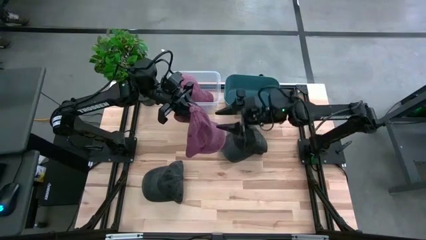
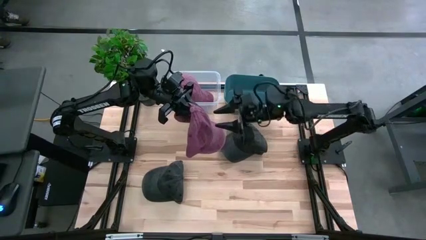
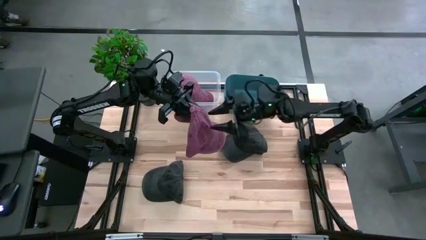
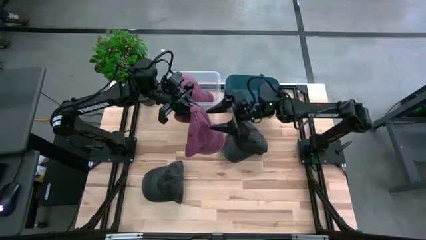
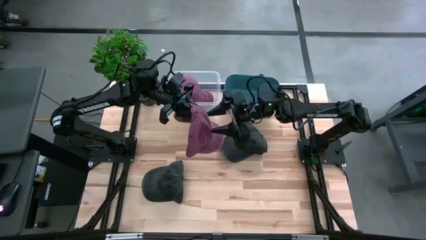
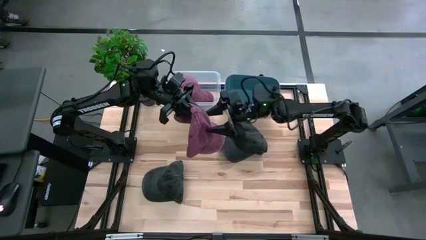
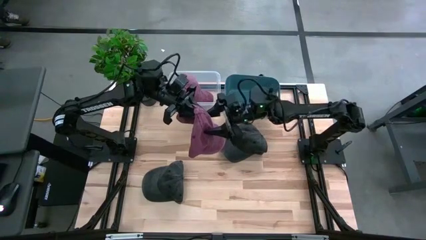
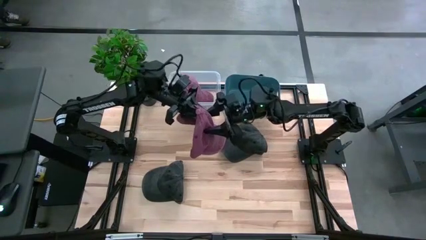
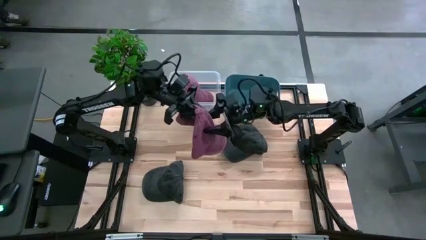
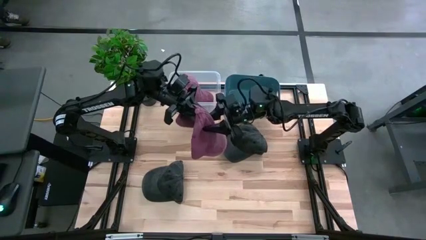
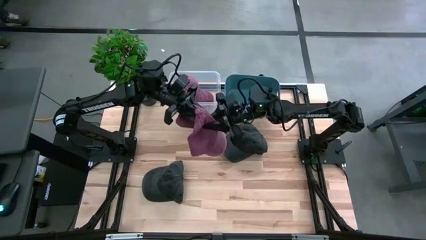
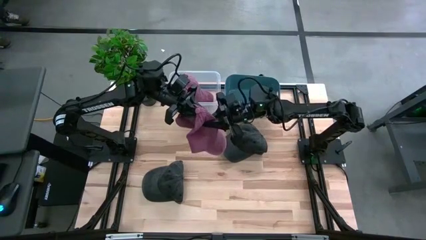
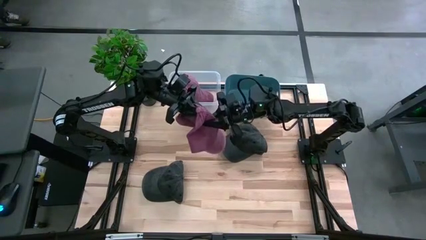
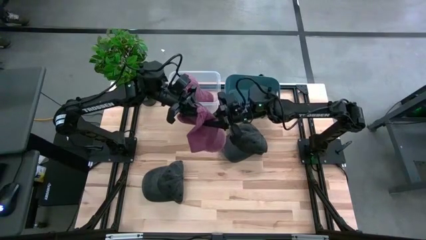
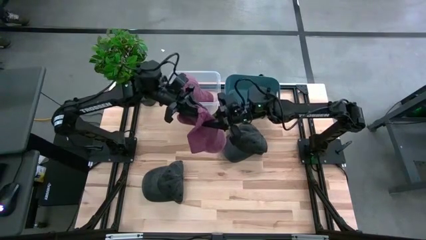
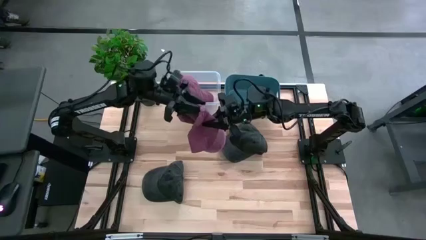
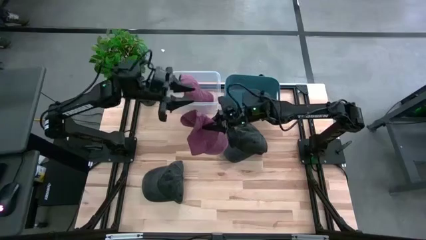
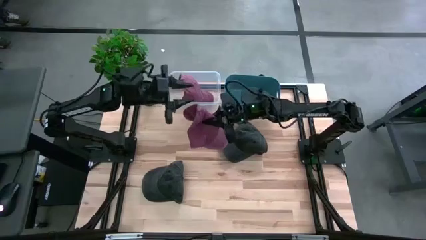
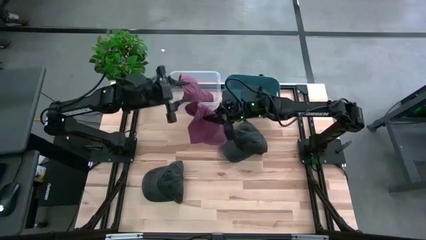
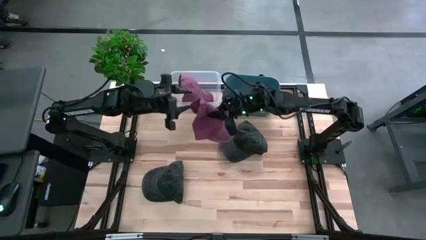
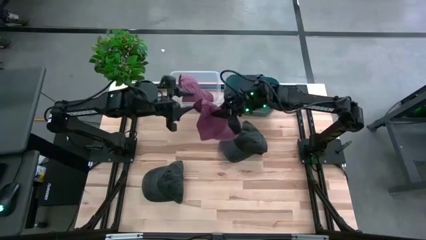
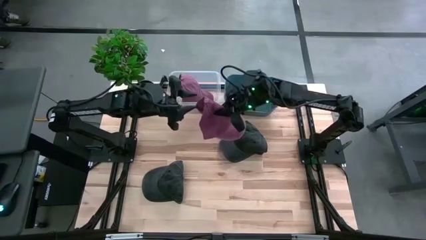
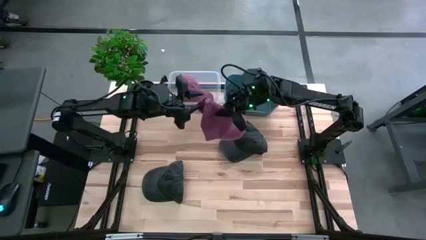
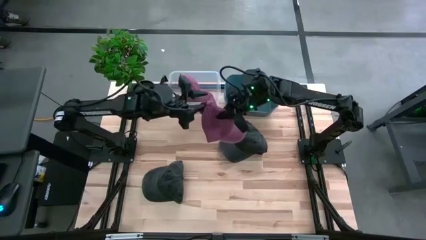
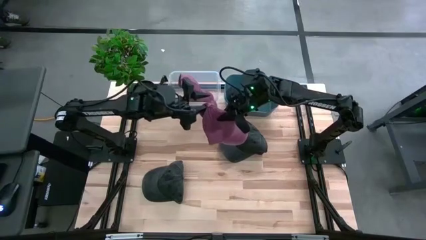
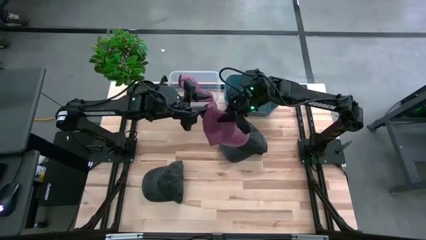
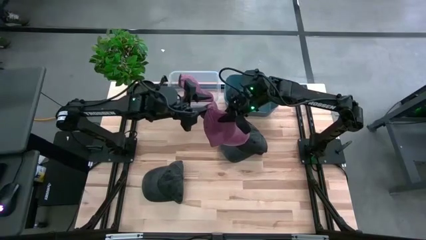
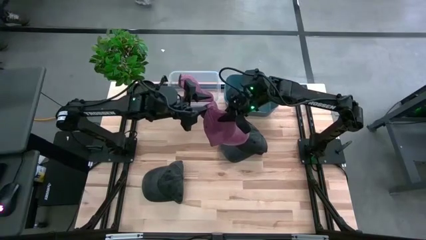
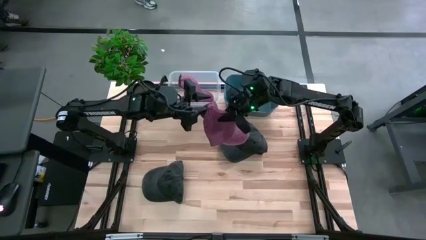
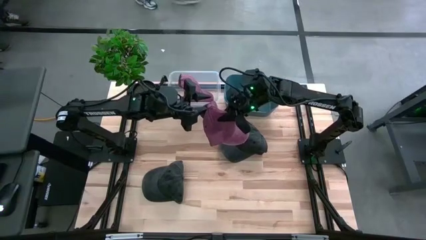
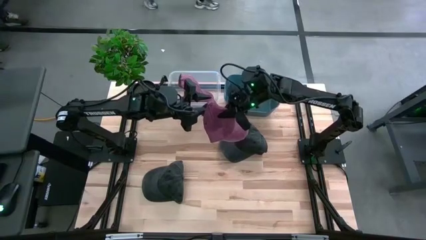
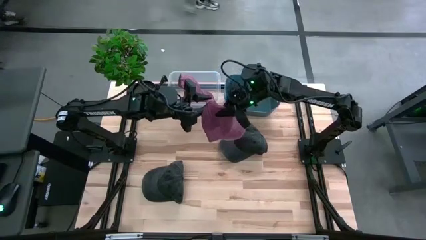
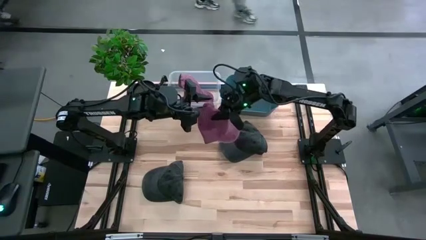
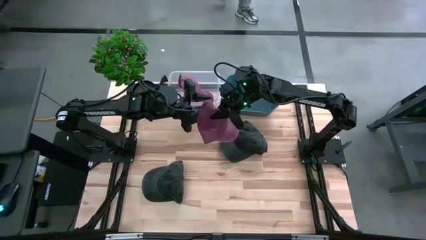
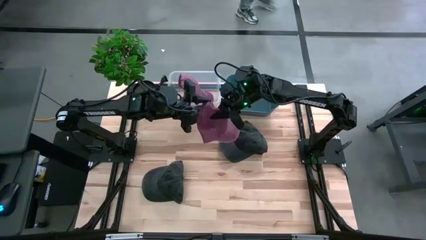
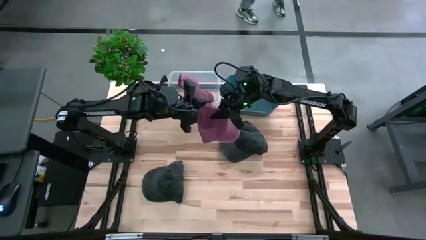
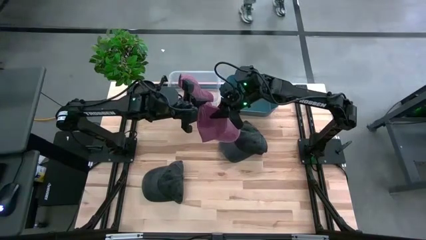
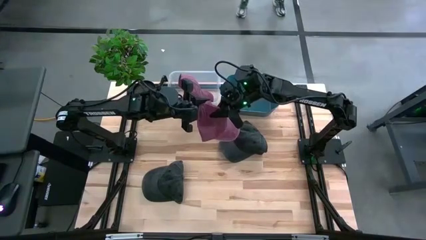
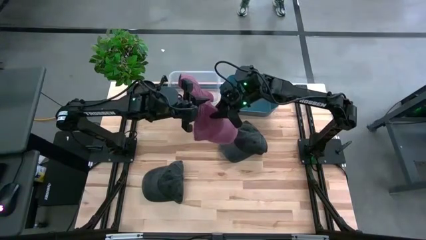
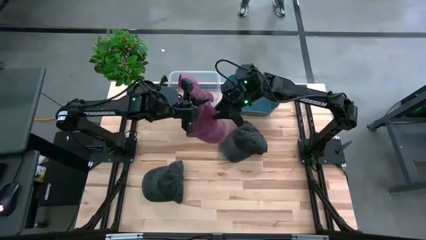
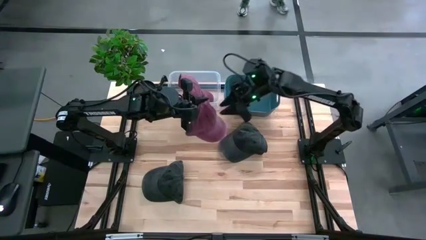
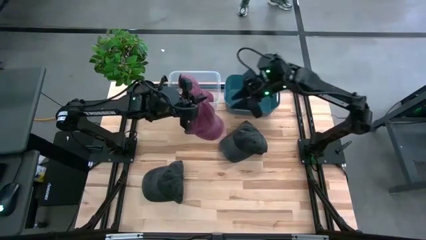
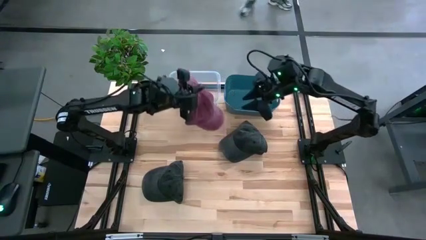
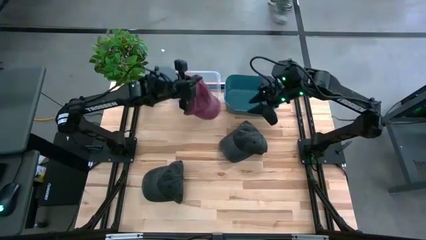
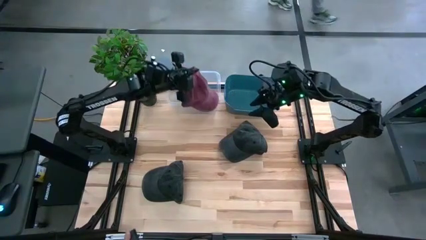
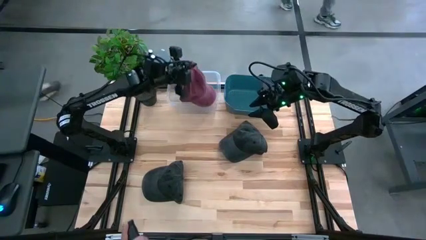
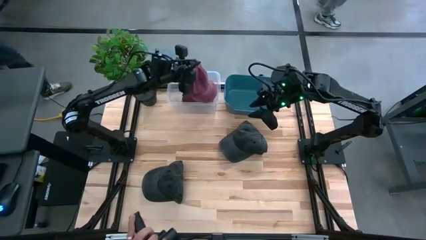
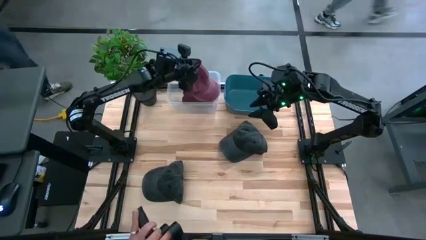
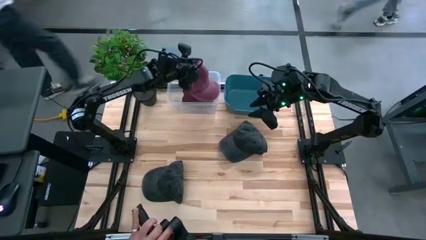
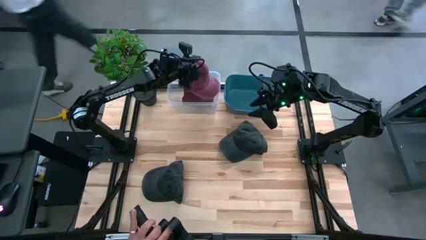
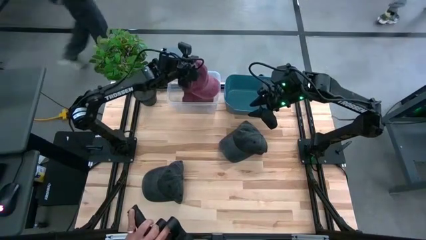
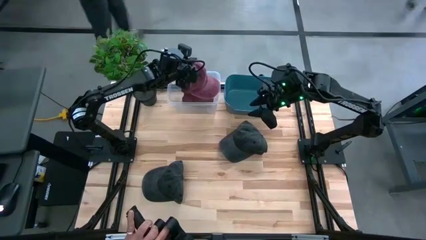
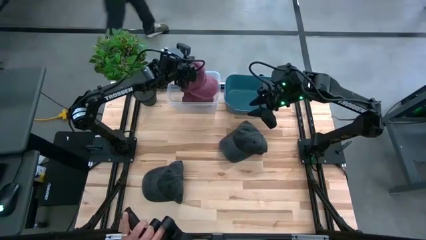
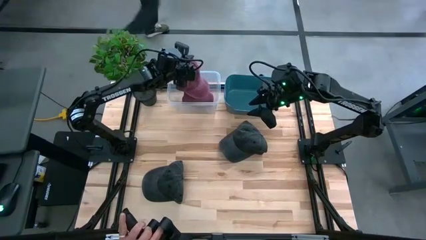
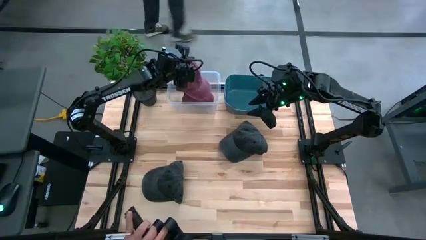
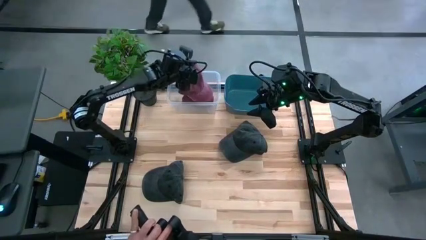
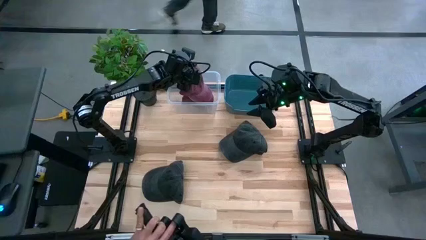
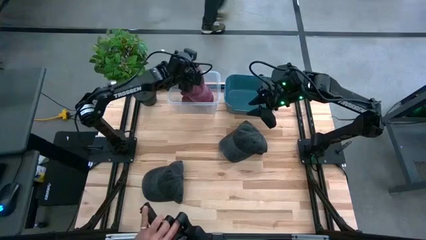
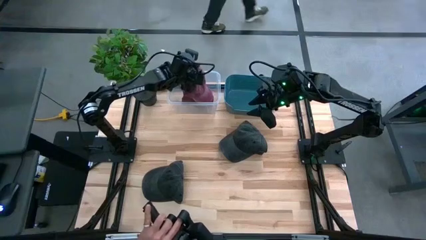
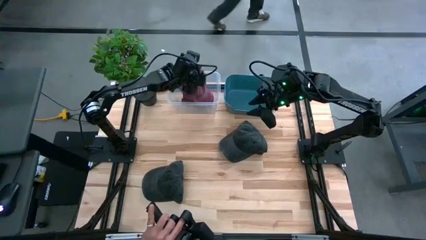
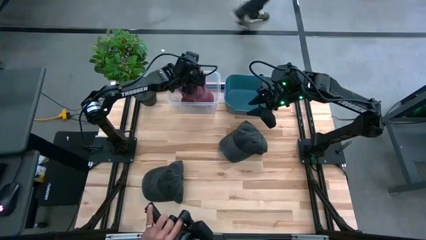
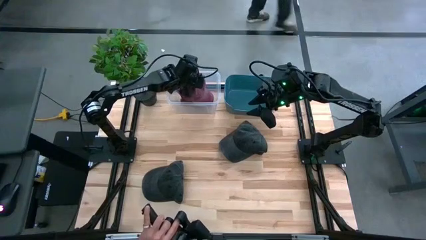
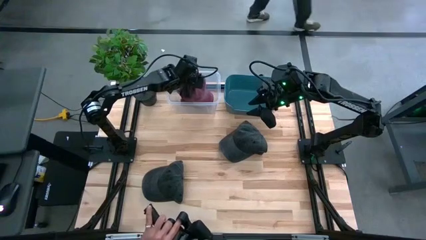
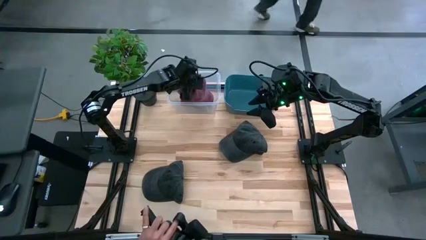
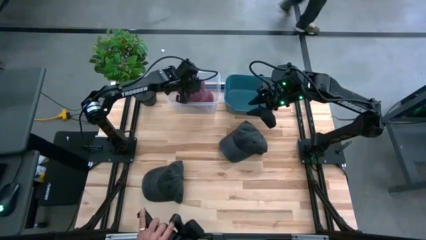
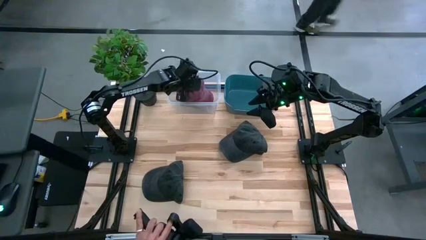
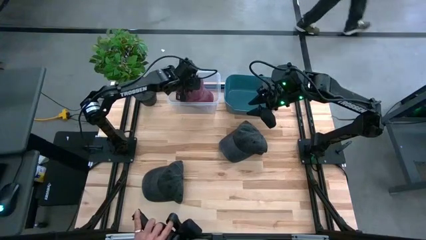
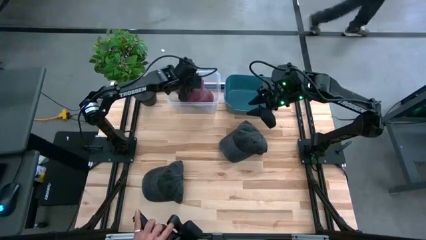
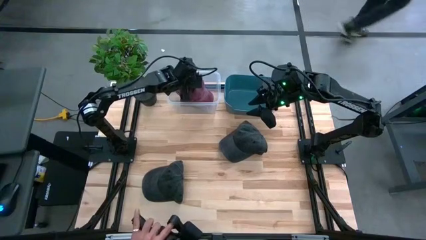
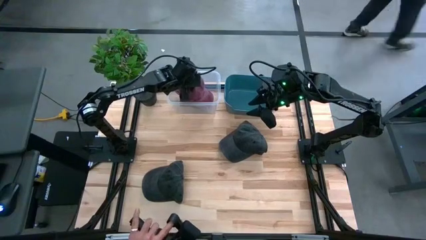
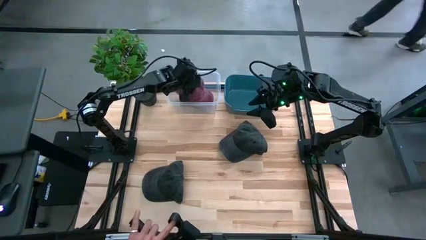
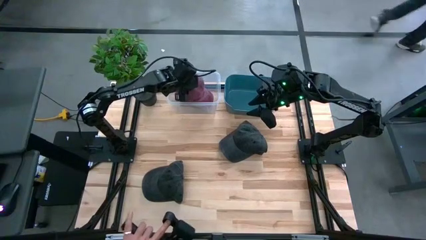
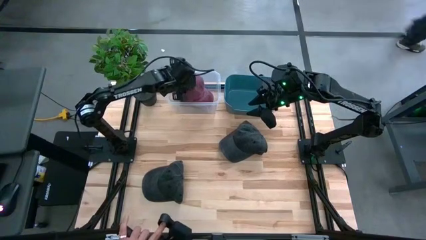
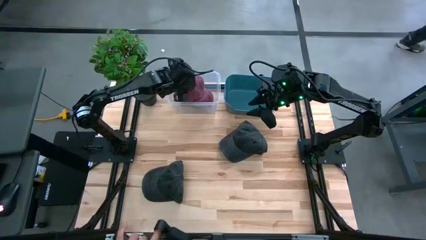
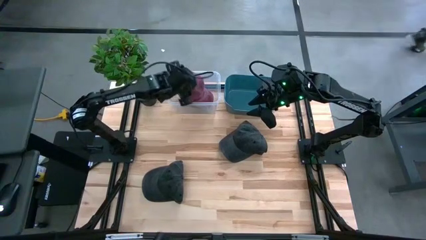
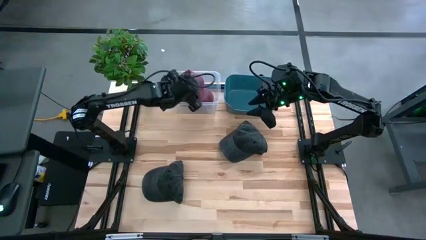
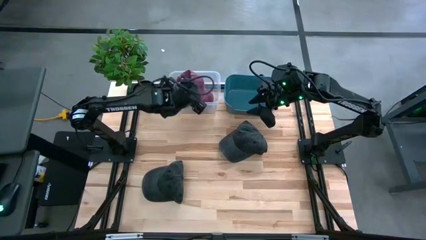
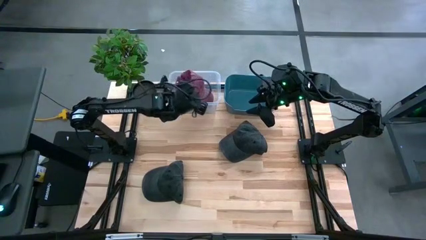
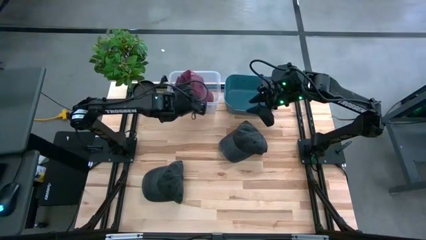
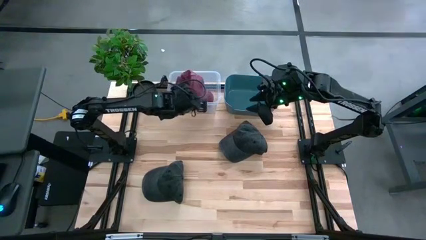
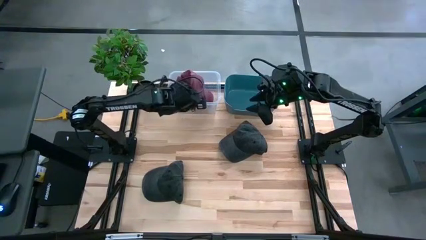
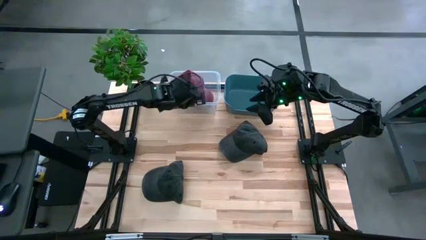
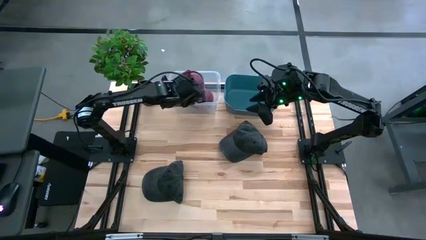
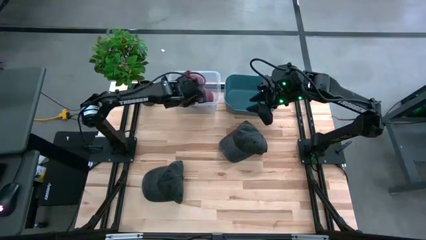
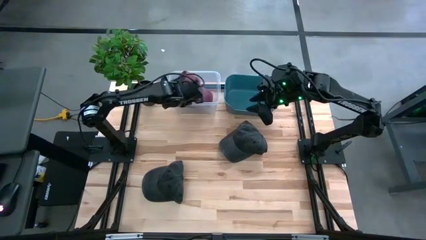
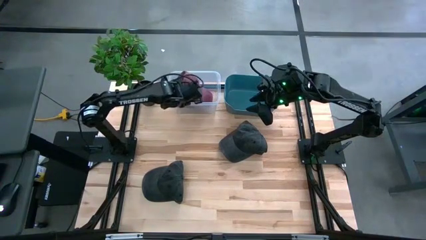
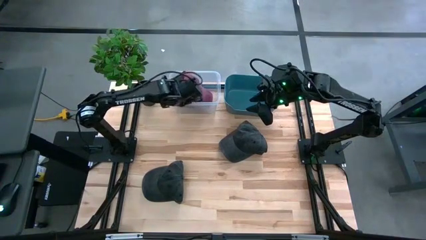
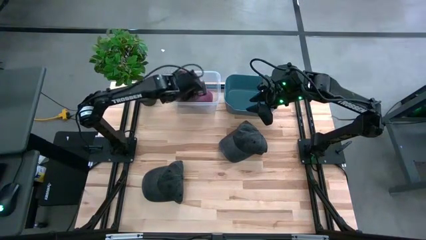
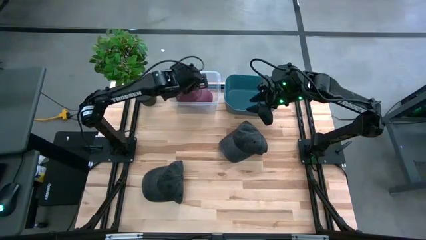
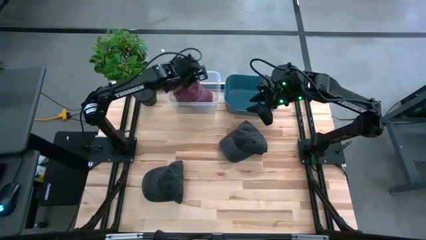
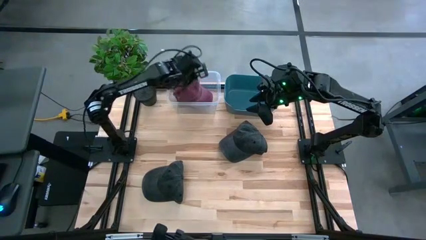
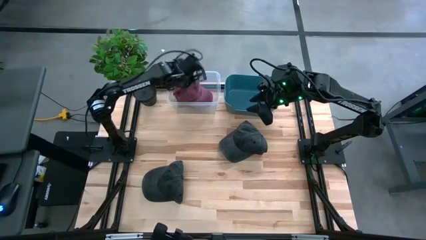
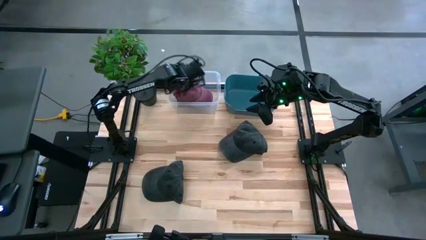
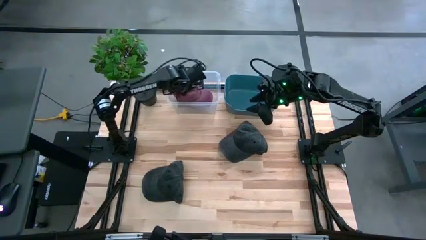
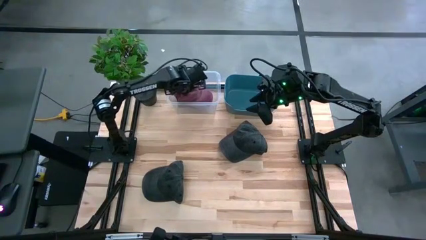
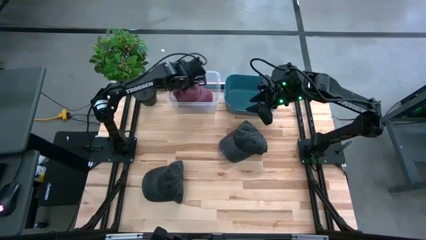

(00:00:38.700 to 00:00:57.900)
Task: Pick & Place hat
Put the red cap into the transparent bin
